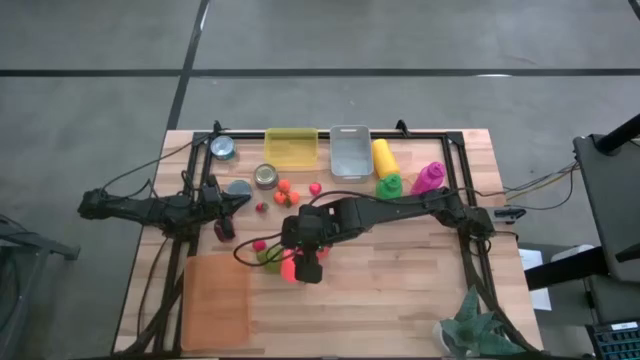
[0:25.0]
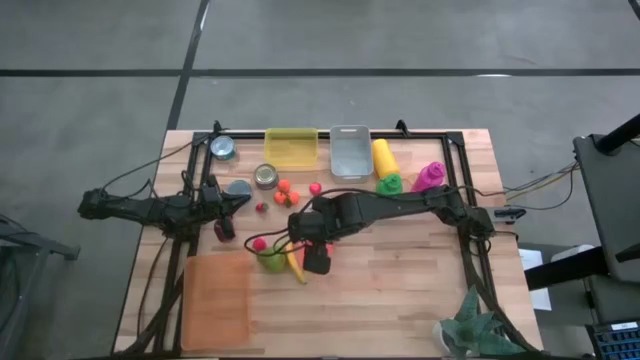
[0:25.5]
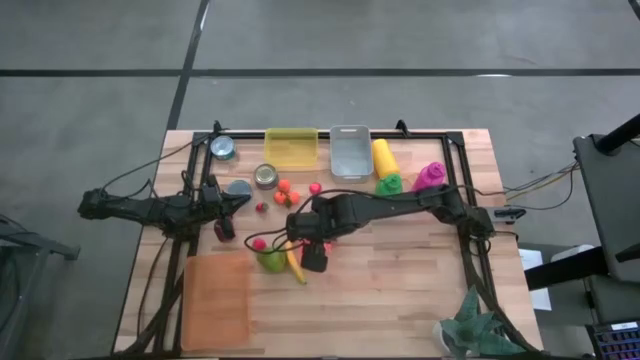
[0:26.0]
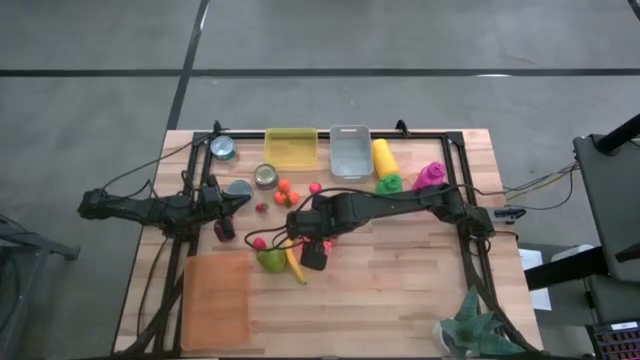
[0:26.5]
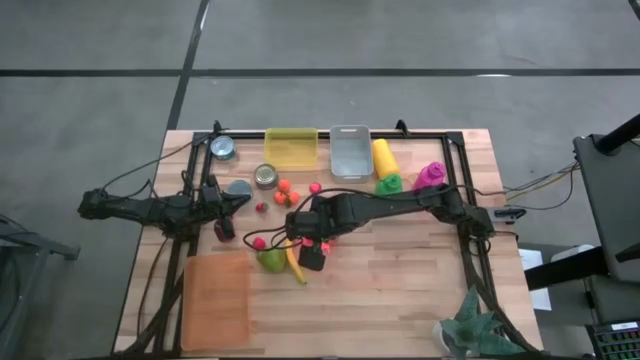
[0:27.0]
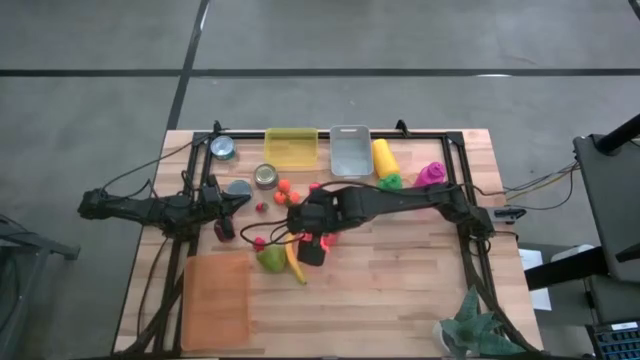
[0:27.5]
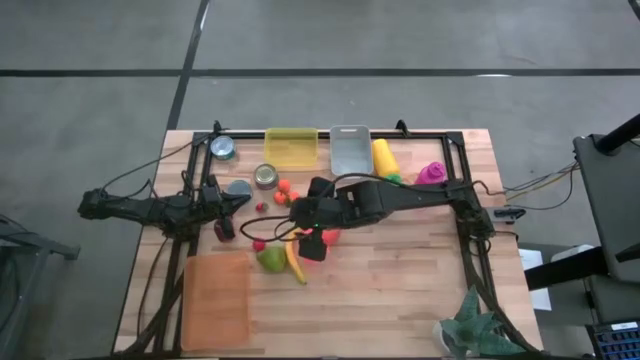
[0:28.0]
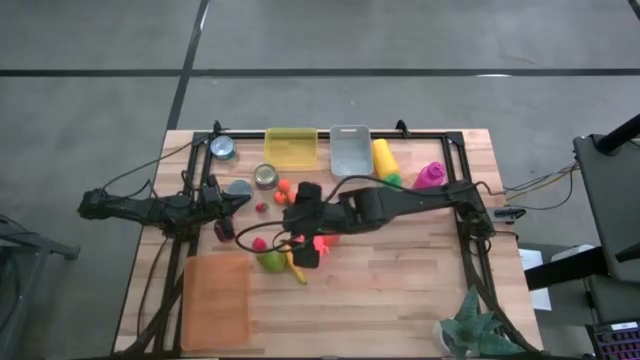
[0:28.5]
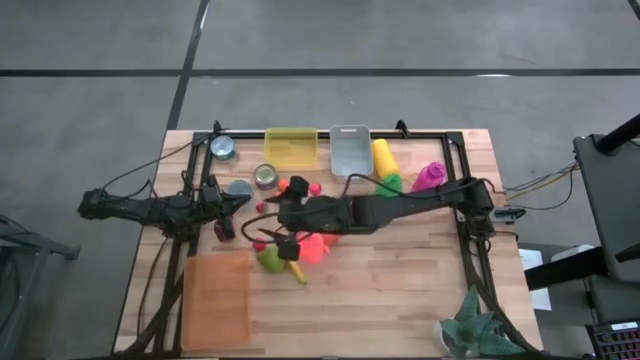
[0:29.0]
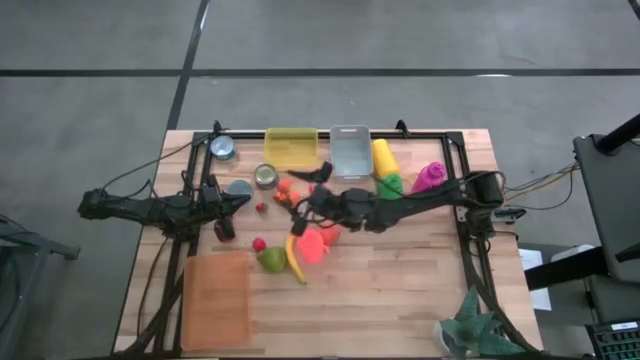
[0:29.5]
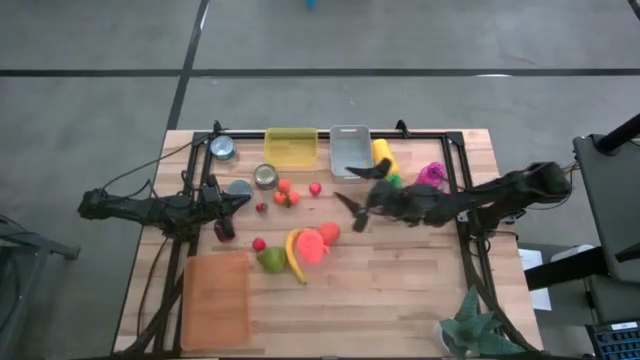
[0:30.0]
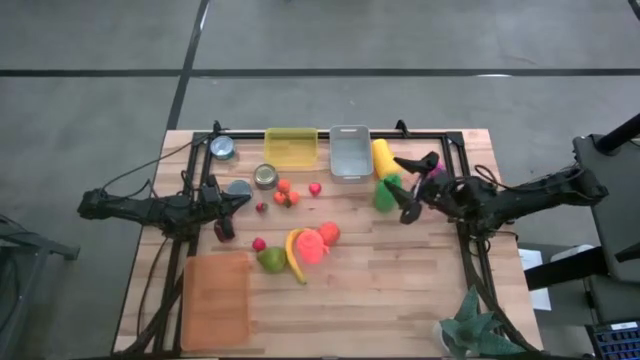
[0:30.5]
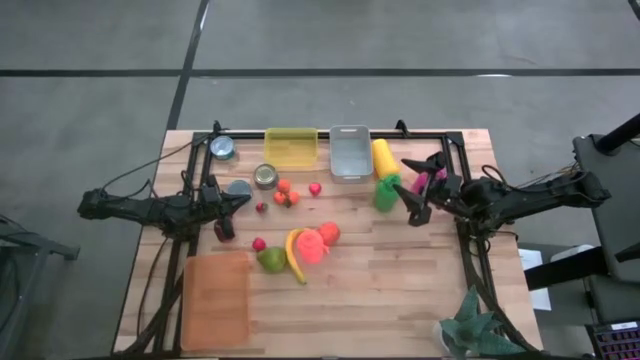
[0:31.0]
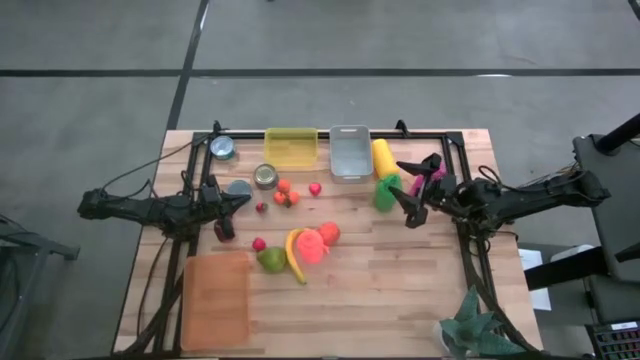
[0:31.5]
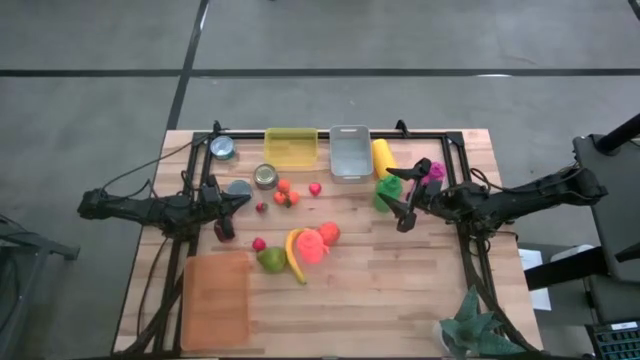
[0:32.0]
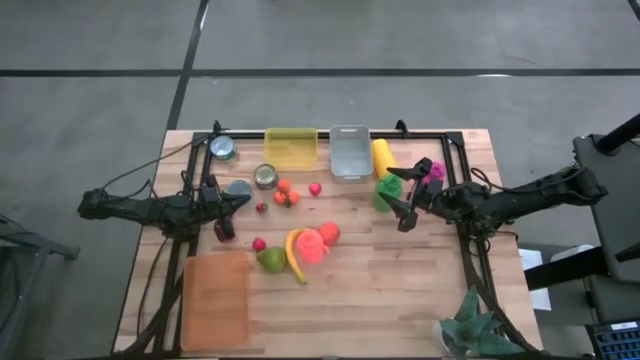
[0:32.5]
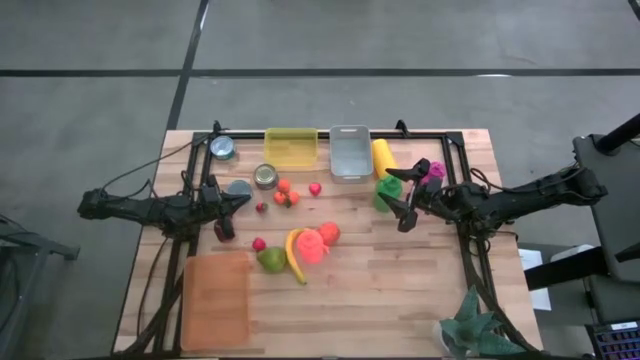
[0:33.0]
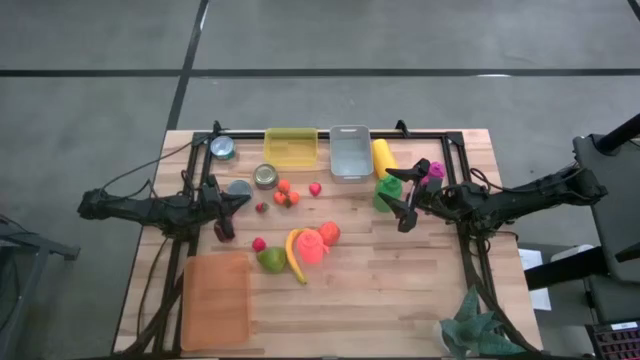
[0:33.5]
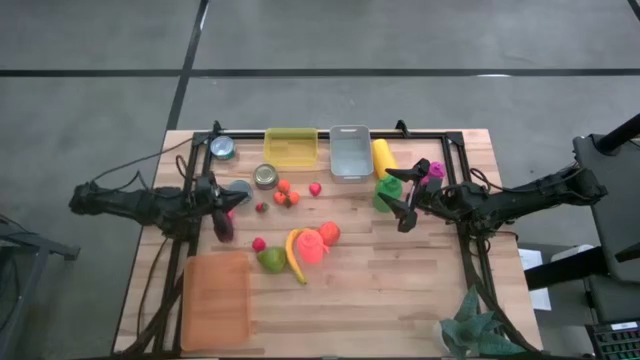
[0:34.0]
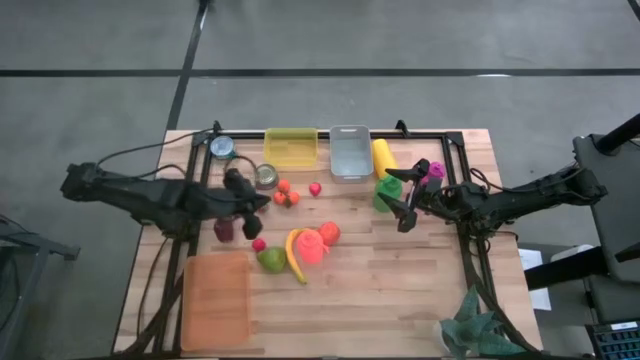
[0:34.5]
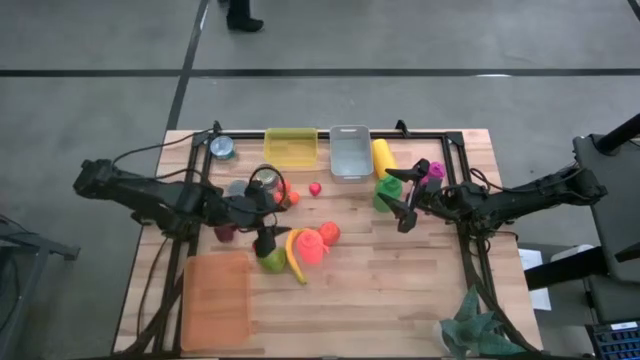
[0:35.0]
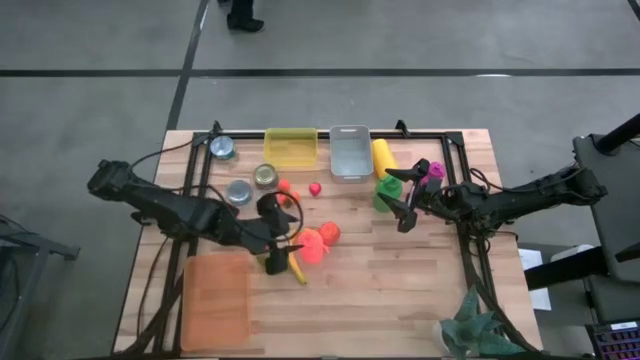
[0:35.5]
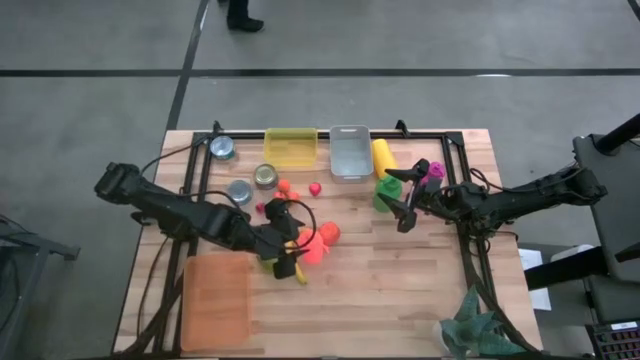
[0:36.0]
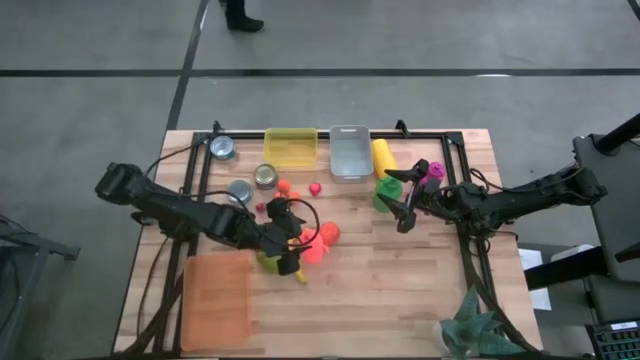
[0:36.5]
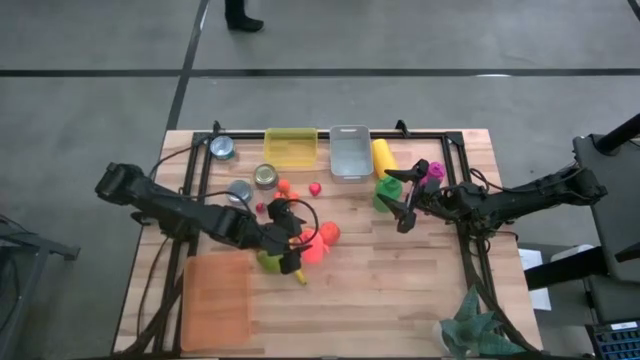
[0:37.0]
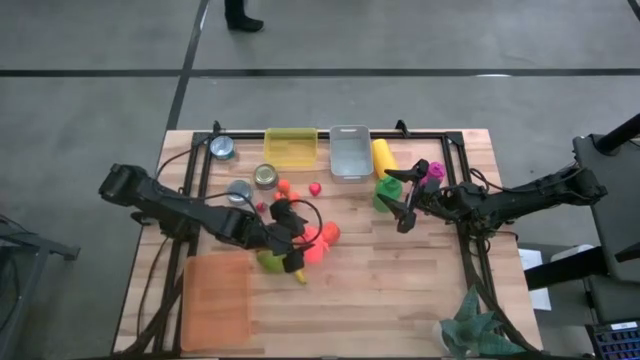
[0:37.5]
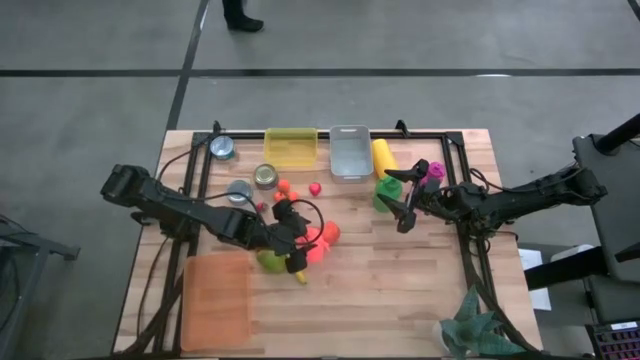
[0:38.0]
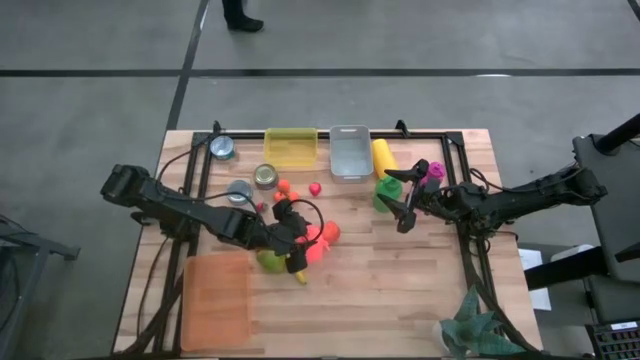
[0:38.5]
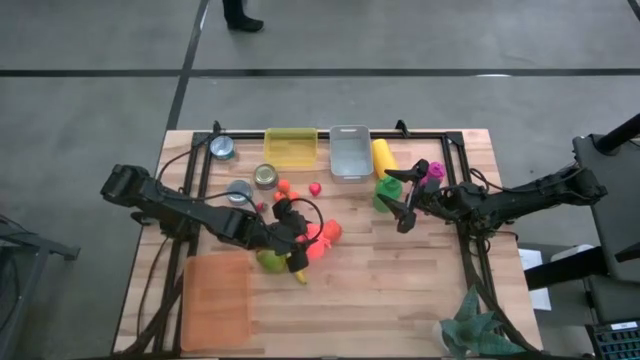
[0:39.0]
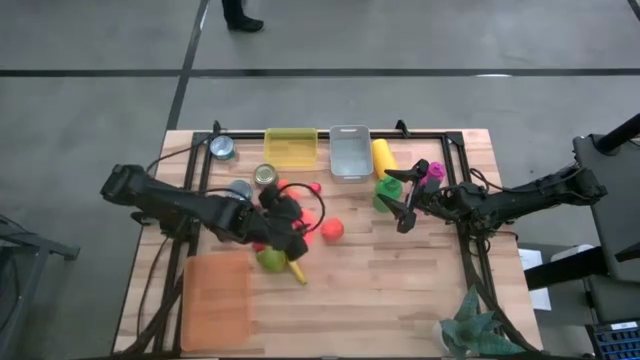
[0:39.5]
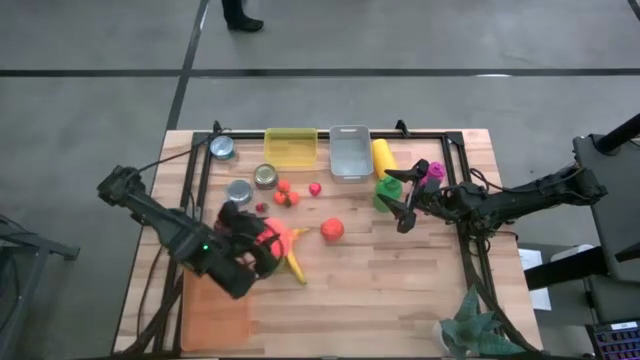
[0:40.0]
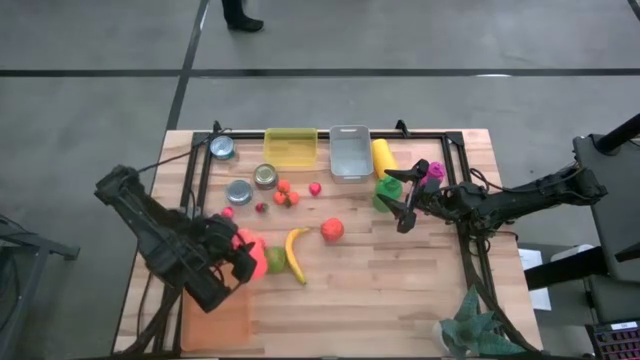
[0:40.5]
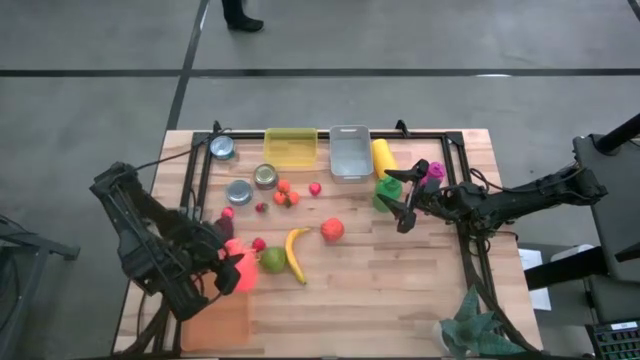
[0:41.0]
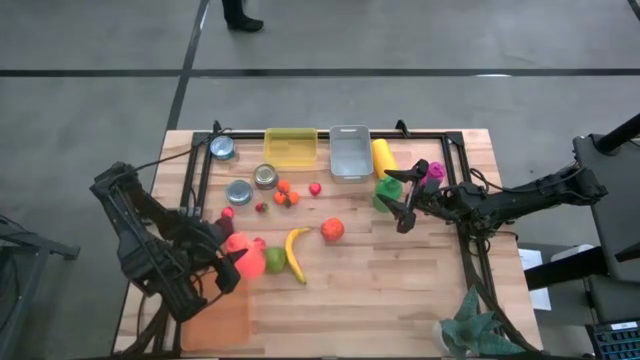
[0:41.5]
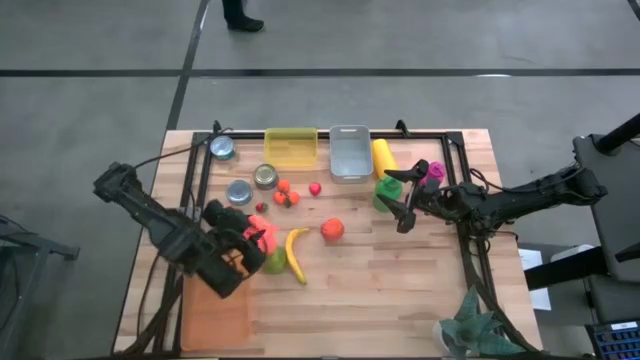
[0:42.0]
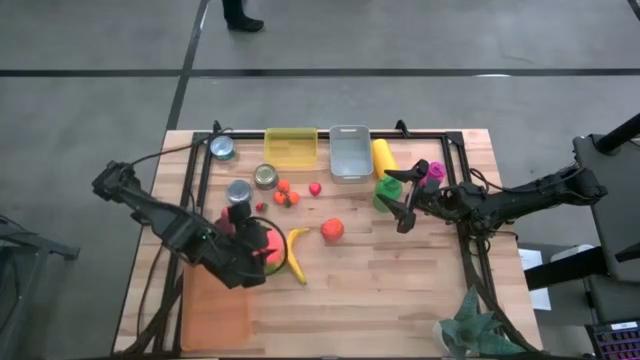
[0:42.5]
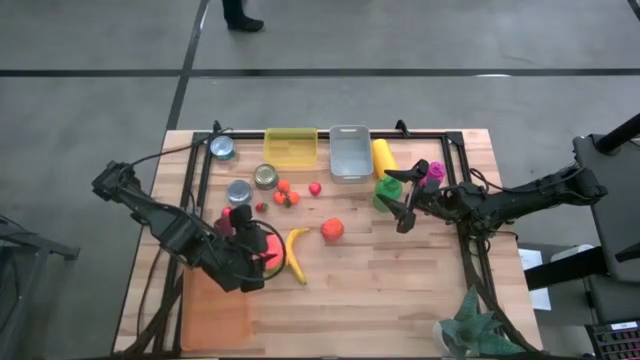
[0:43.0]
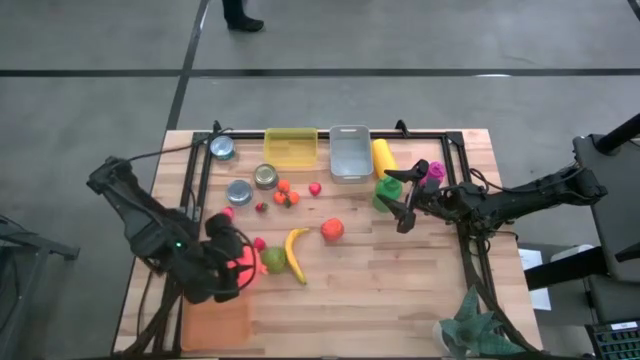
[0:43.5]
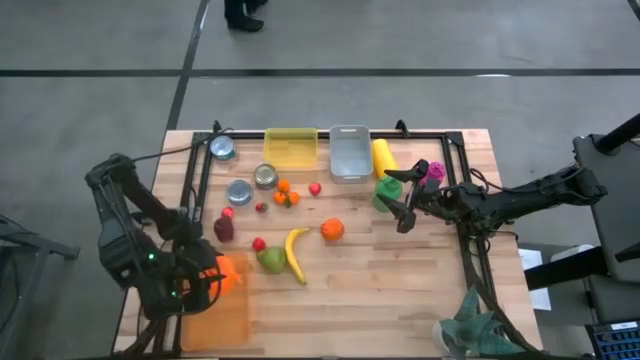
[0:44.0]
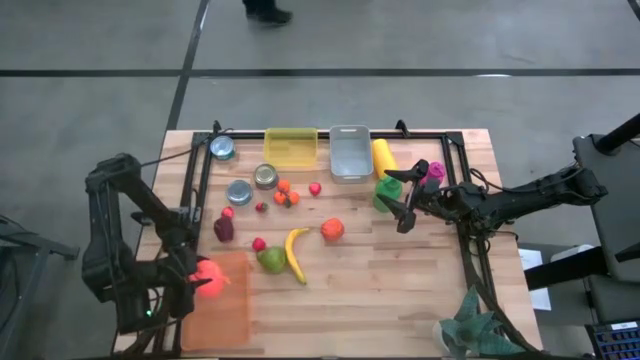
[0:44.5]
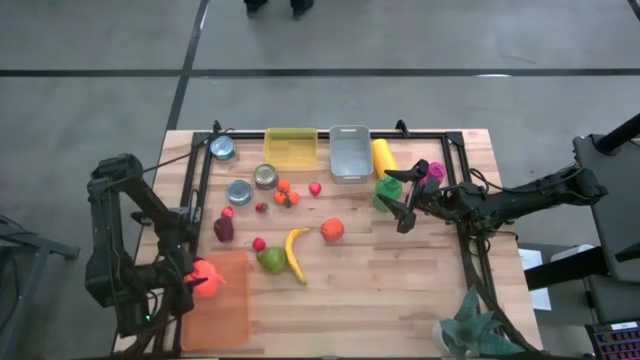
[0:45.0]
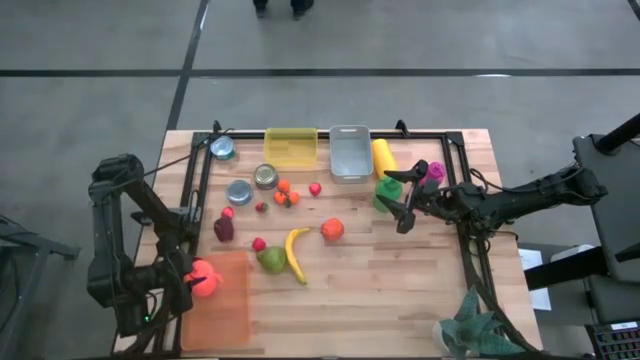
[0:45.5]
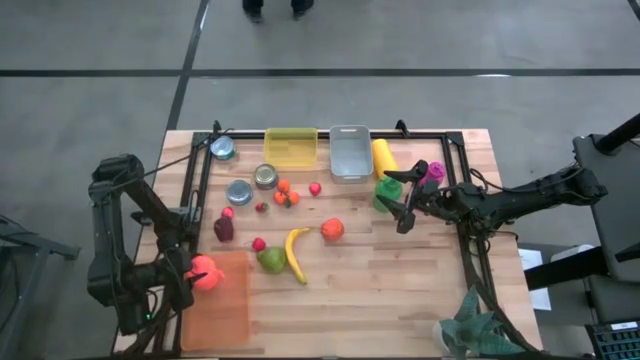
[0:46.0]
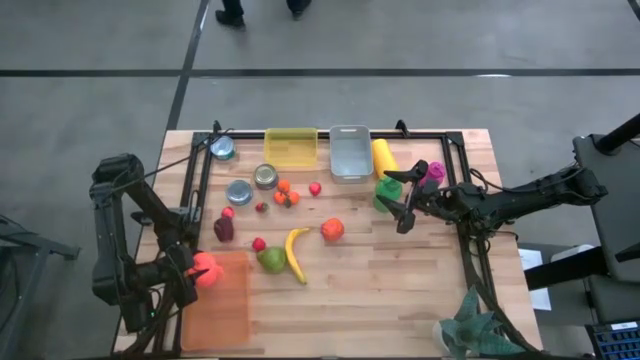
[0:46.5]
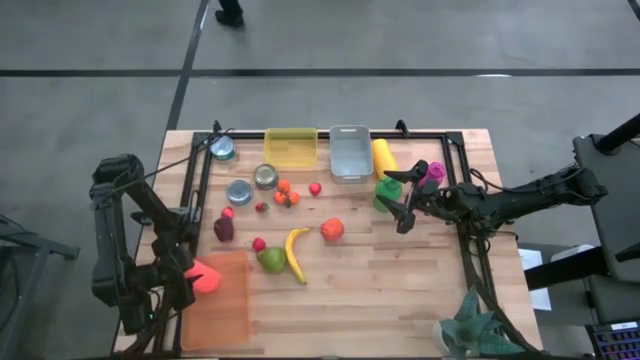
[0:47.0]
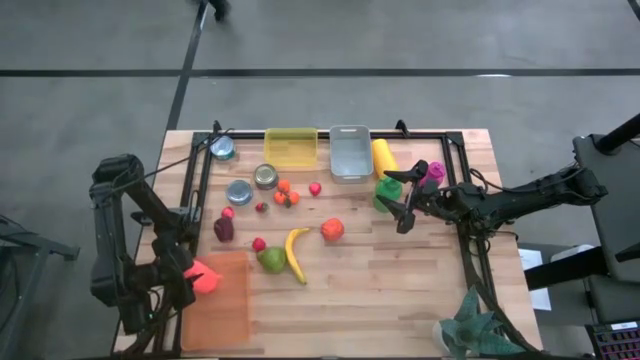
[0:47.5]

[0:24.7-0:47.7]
Task: Pick & Place Food Item
Put the orange tumbler into the orange bin
